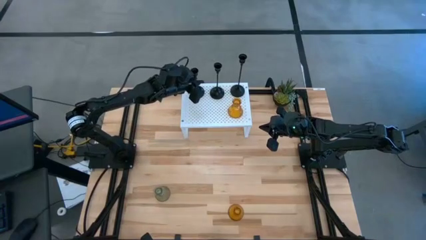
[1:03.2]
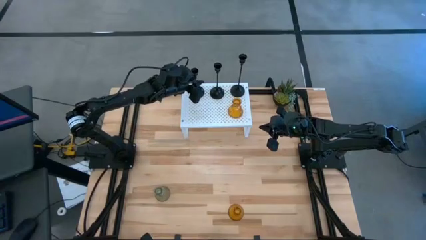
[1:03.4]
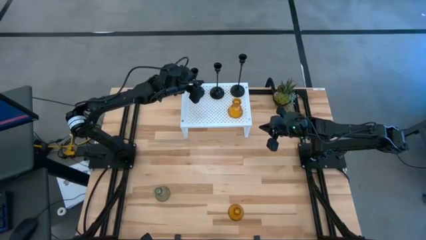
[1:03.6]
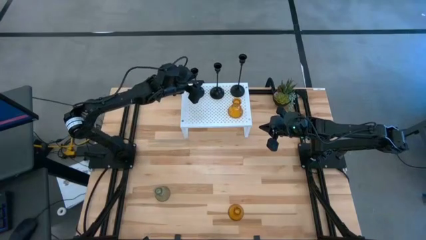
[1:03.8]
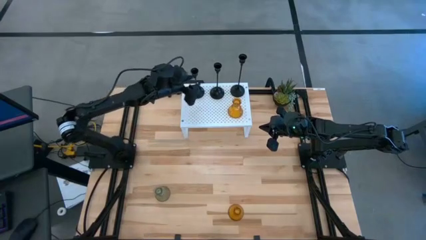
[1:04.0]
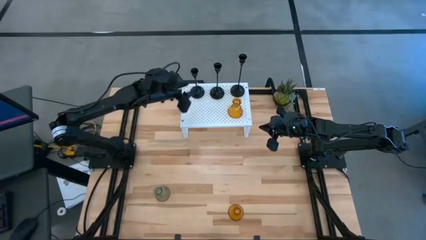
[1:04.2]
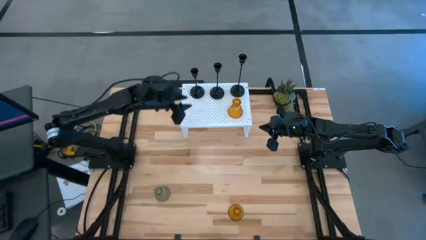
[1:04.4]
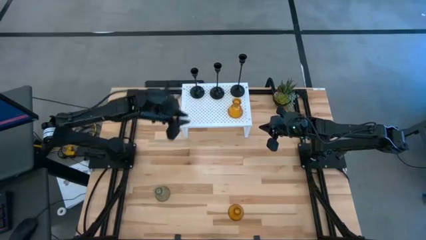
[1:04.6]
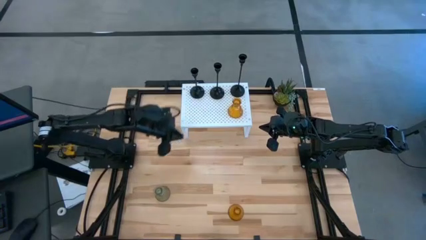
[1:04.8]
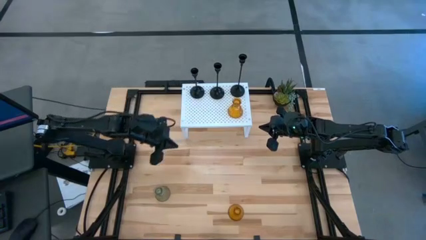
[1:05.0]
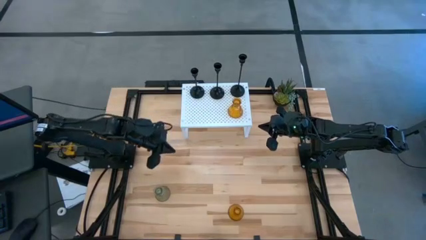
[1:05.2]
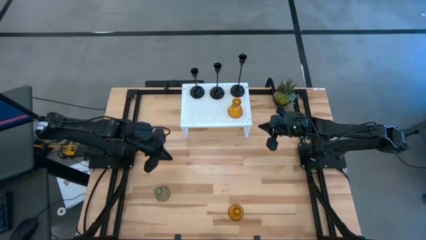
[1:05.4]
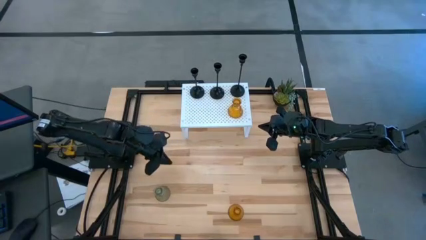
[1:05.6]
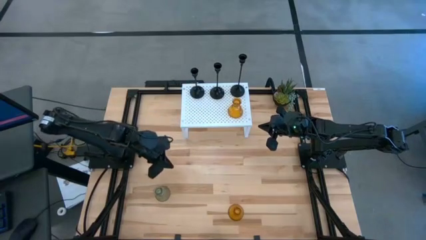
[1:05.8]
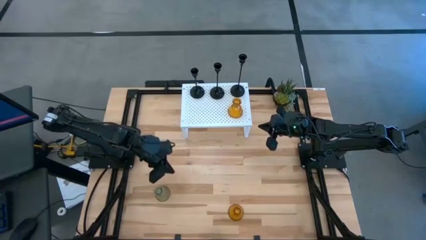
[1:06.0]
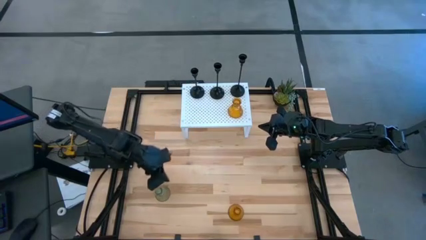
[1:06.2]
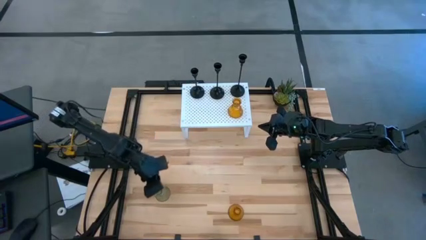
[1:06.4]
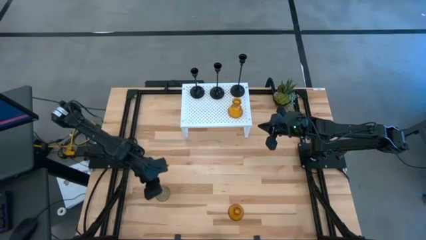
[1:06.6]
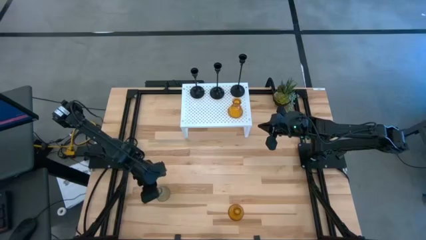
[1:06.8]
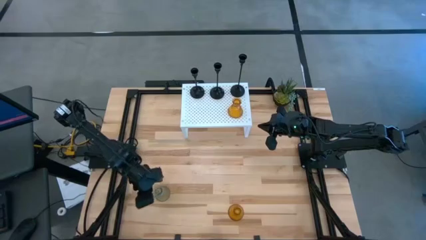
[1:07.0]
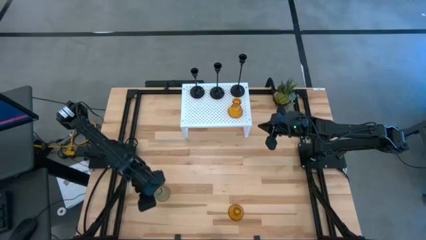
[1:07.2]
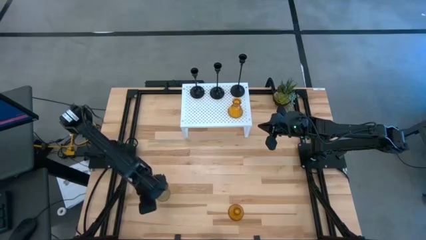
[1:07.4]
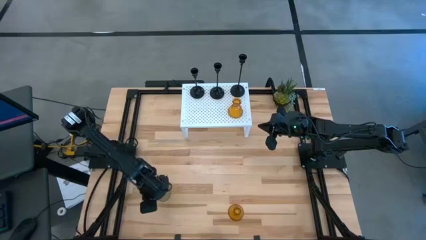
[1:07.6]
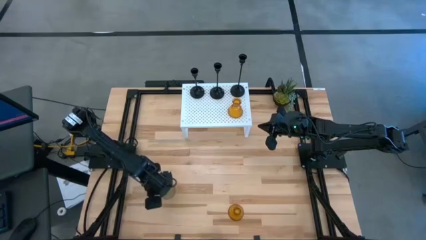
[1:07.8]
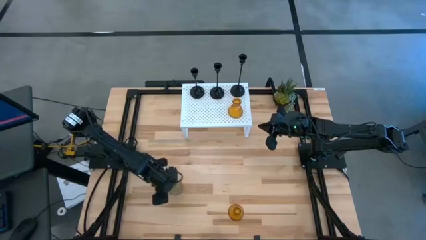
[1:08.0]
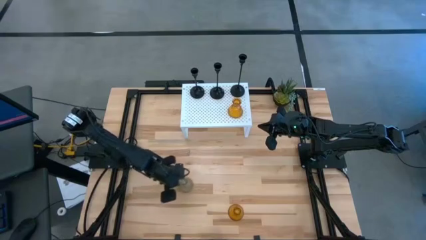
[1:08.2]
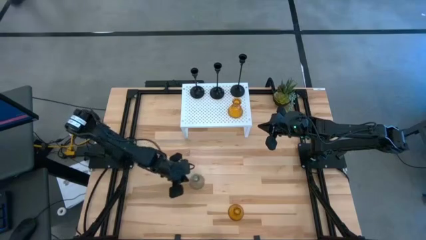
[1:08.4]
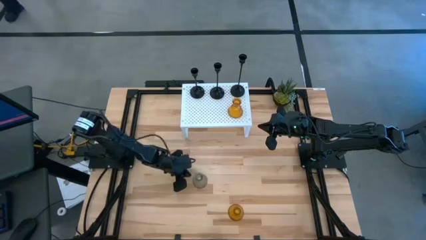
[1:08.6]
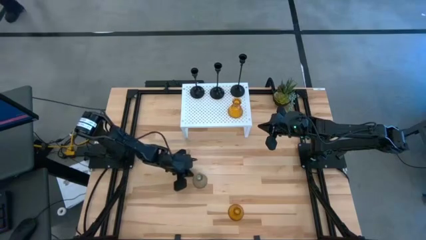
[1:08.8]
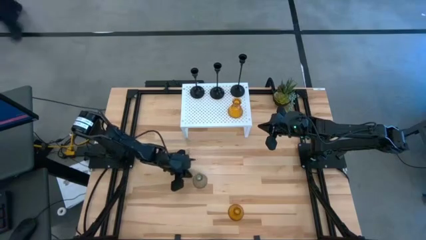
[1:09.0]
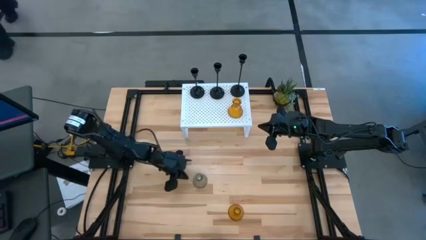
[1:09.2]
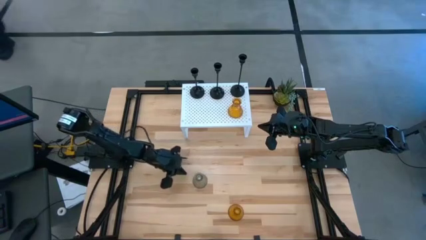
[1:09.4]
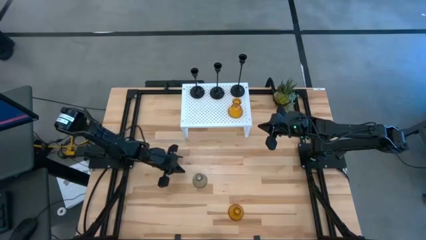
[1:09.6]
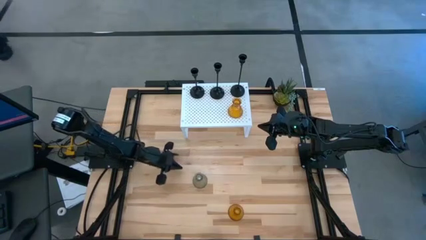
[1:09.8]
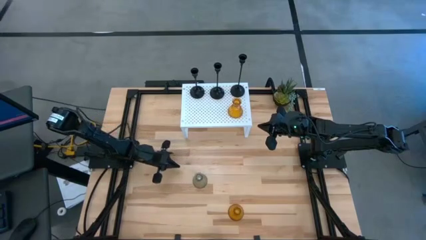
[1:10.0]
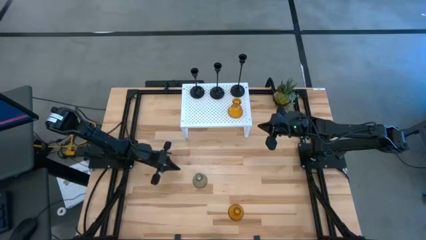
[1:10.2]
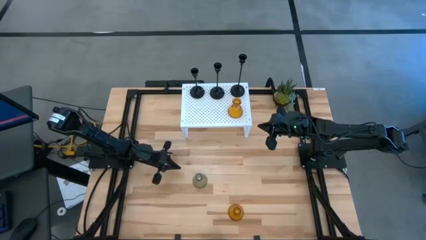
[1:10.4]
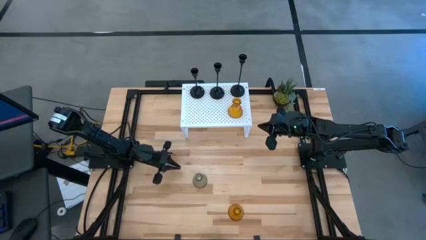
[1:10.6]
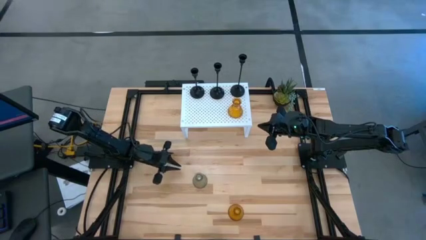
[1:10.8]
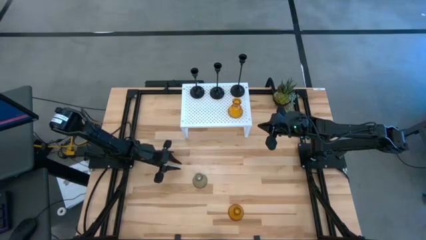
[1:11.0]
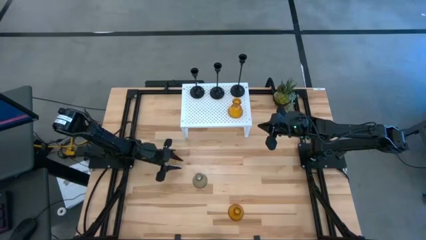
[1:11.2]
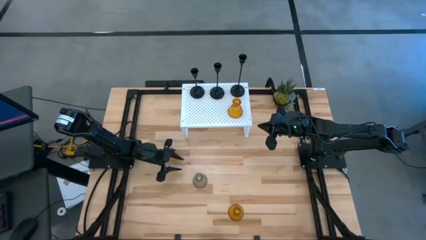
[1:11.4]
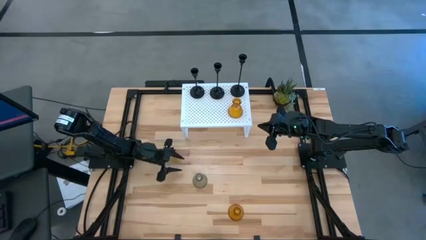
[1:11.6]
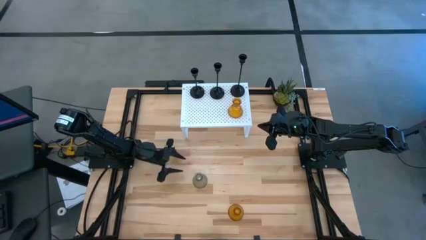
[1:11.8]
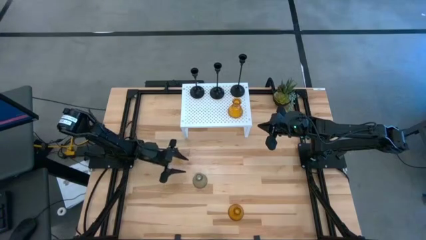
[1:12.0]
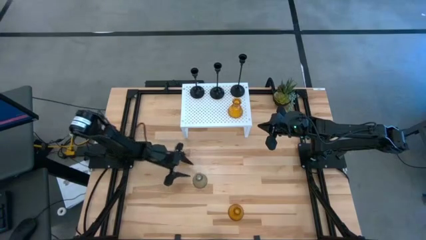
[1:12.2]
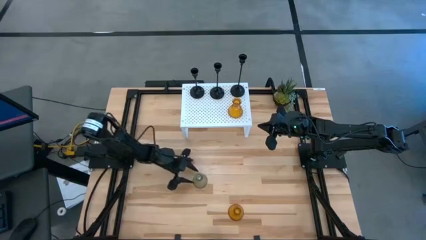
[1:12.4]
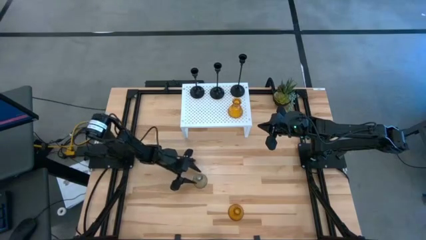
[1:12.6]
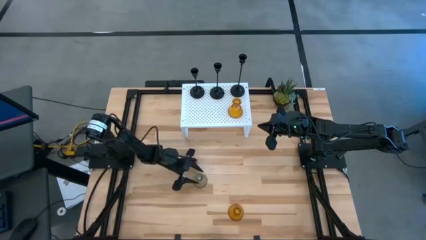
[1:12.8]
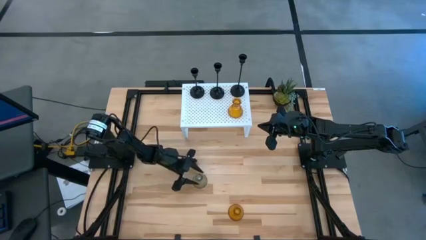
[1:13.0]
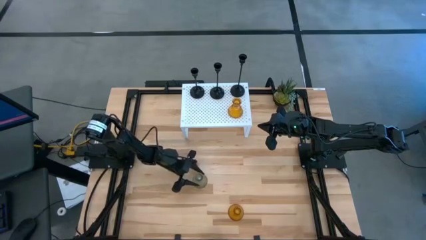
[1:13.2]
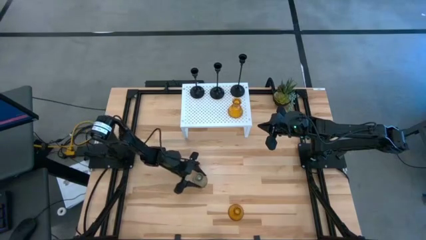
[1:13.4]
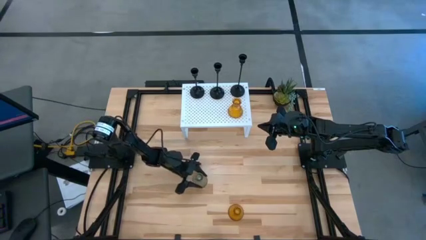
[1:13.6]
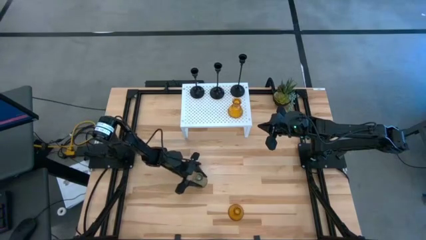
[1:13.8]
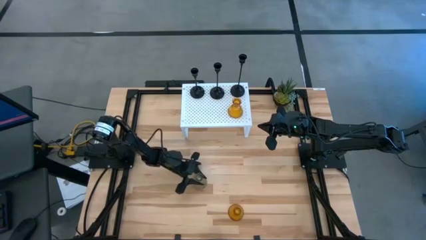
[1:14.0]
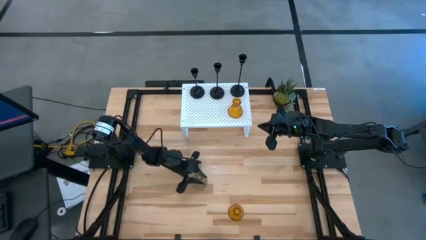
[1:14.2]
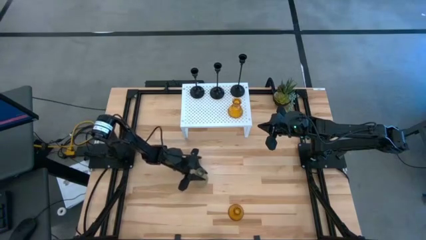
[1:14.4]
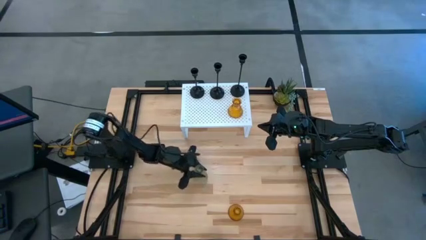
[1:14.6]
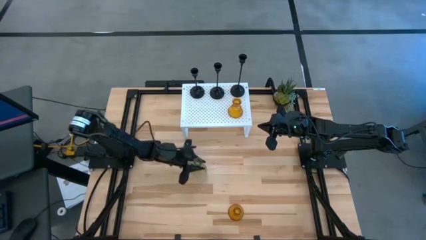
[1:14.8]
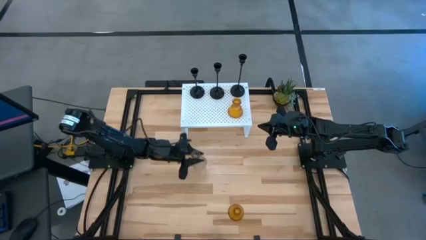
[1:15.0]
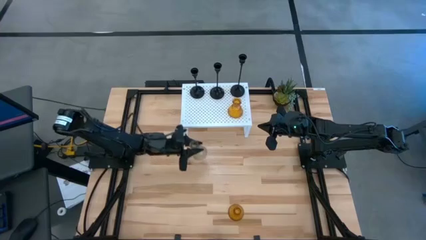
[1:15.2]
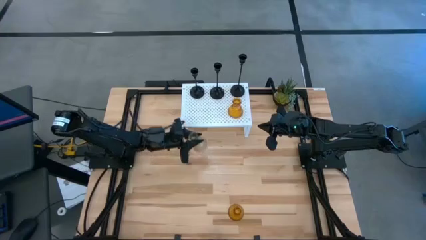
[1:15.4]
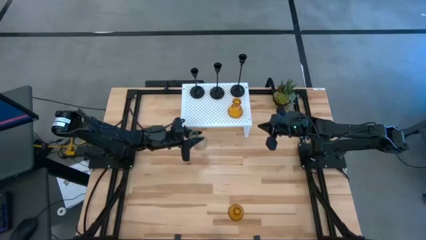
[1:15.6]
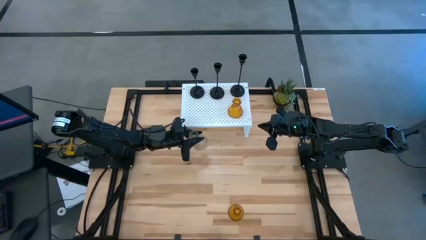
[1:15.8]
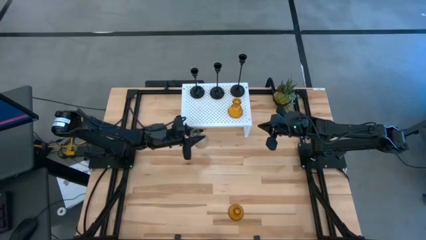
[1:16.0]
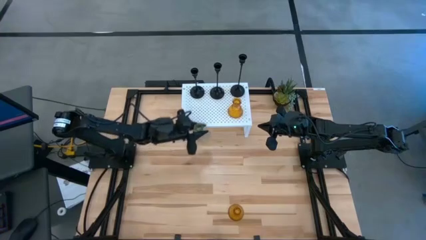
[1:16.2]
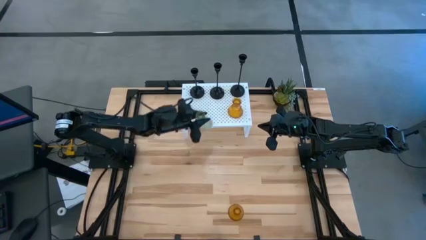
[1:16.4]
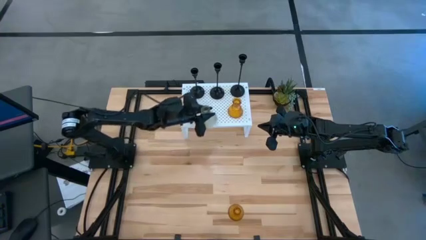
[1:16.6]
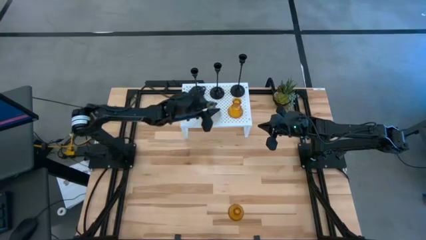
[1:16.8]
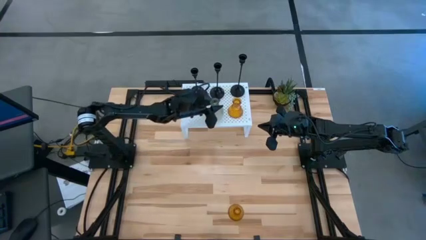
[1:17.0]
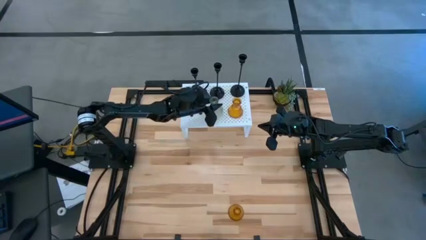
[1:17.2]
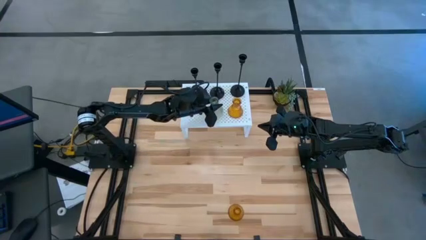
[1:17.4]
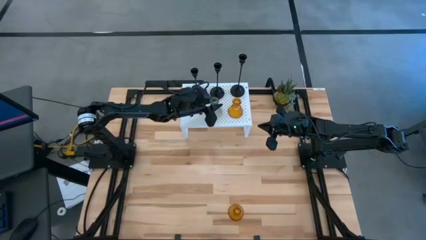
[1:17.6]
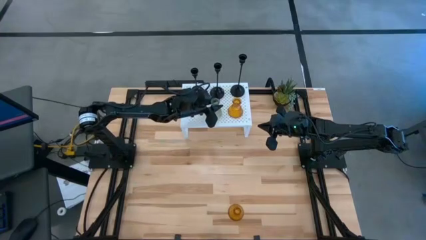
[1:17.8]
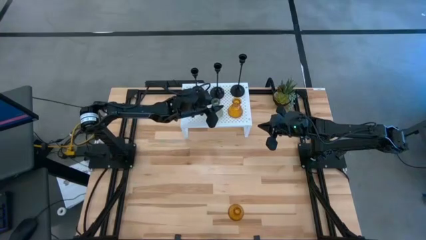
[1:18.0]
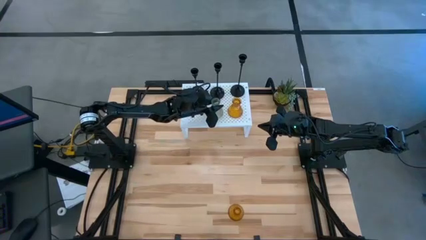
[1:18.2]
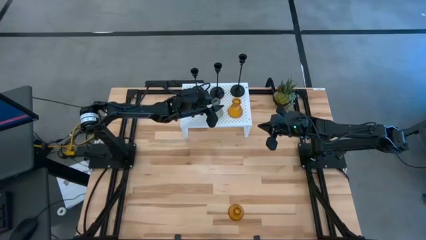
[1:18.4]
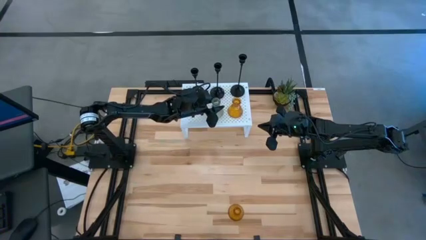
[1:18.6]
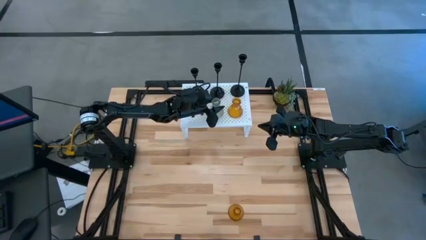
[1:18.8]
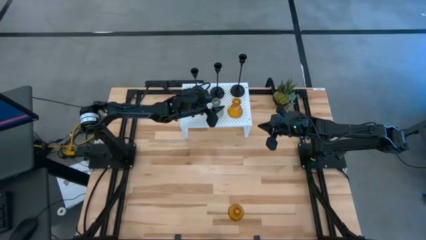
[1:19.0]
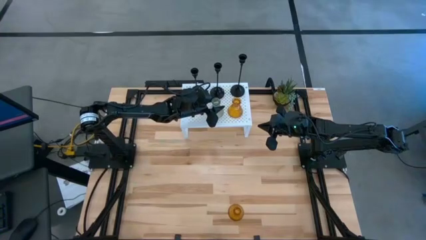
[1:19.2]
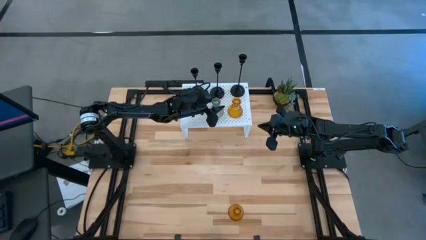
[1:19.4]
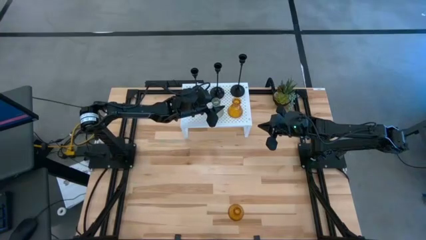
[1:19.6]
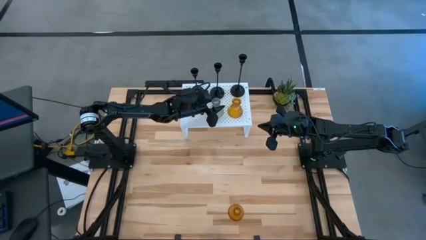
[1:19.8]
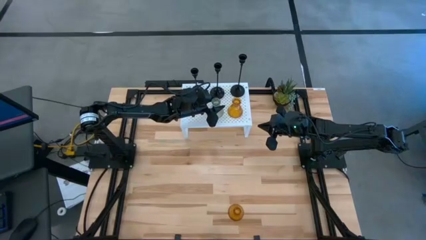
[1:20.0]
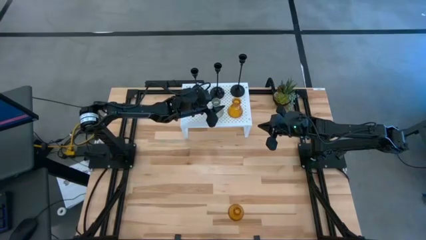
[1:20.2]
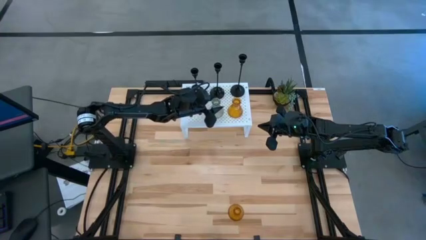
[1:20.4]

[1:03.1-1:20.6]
Task: Pick & Place candle stick holders
Put the clear candle holder on the shelf
